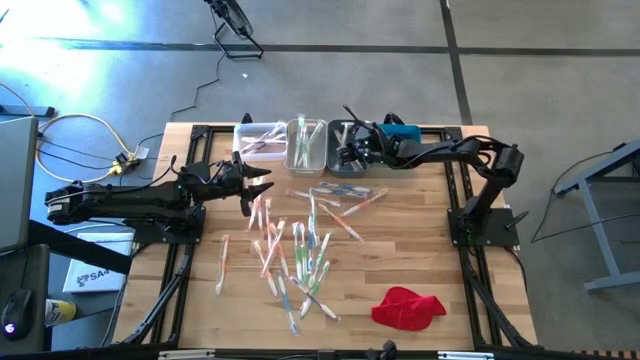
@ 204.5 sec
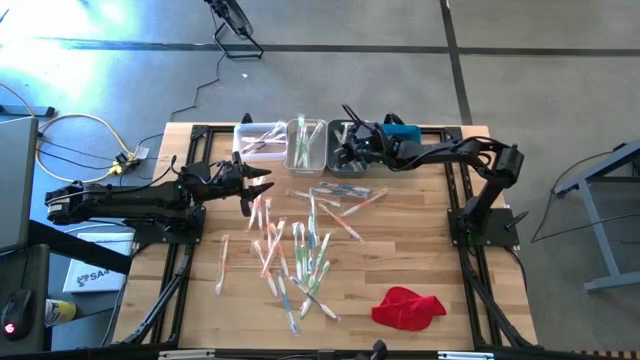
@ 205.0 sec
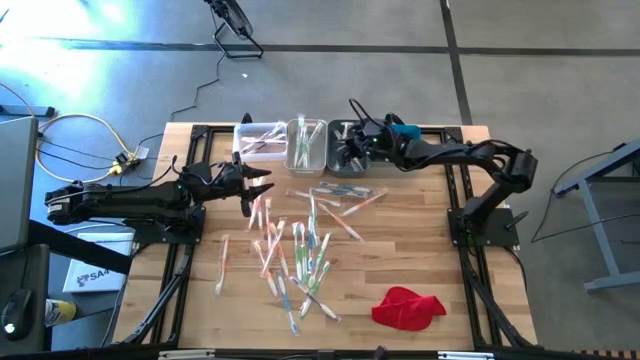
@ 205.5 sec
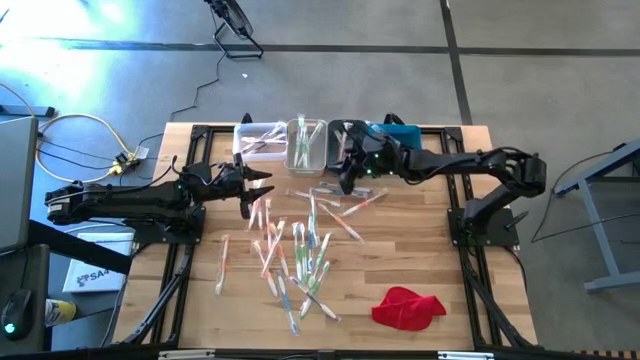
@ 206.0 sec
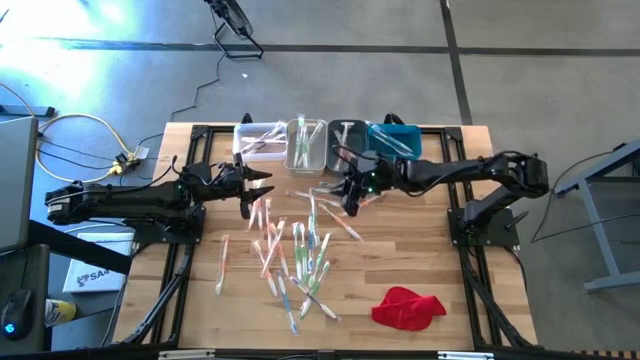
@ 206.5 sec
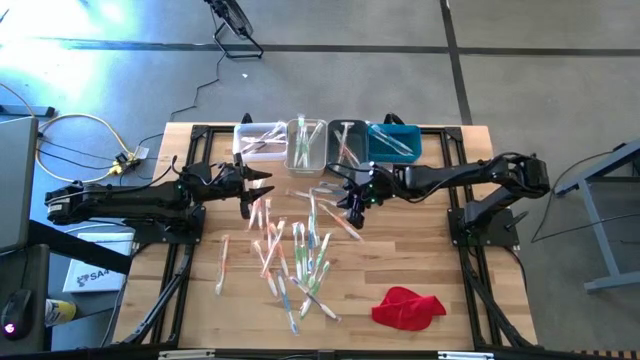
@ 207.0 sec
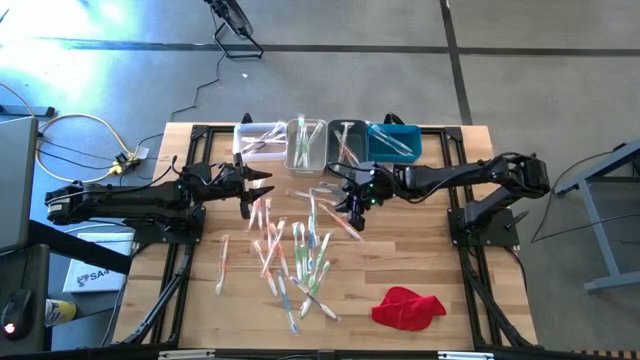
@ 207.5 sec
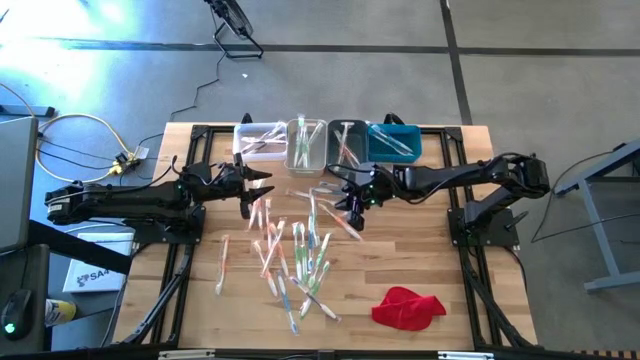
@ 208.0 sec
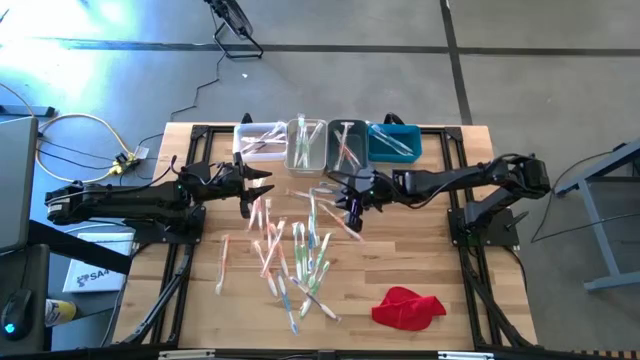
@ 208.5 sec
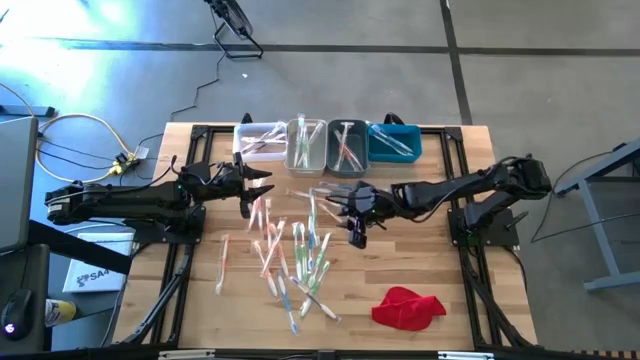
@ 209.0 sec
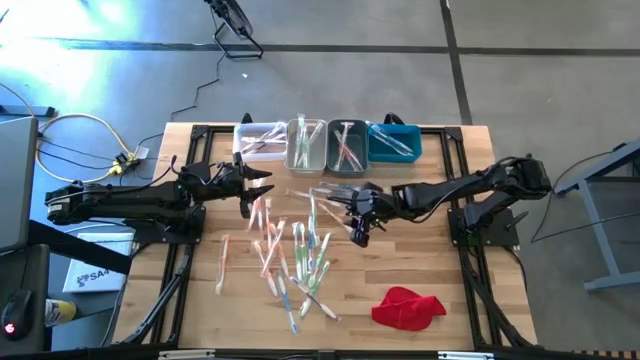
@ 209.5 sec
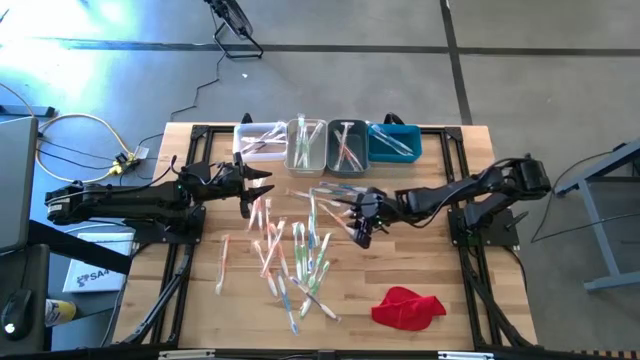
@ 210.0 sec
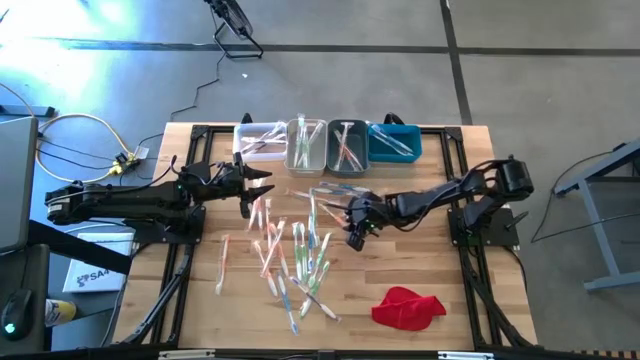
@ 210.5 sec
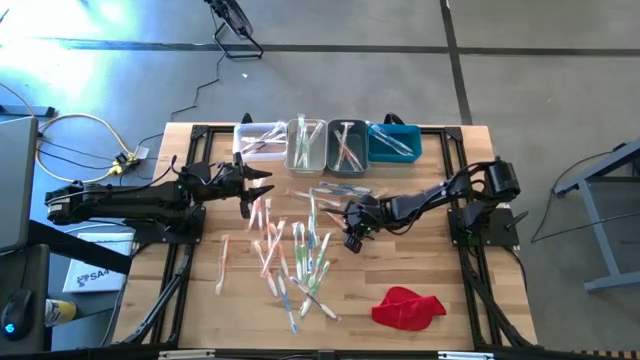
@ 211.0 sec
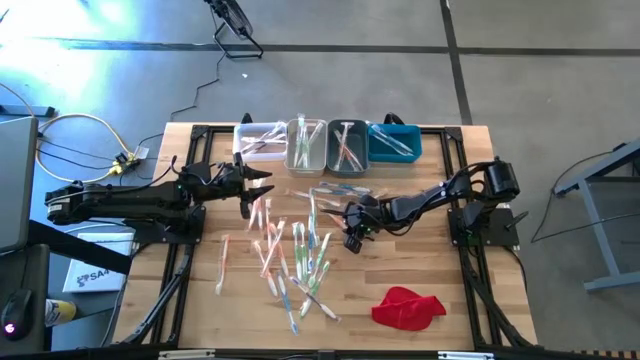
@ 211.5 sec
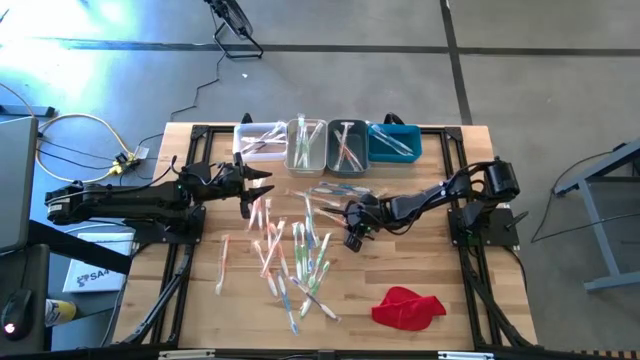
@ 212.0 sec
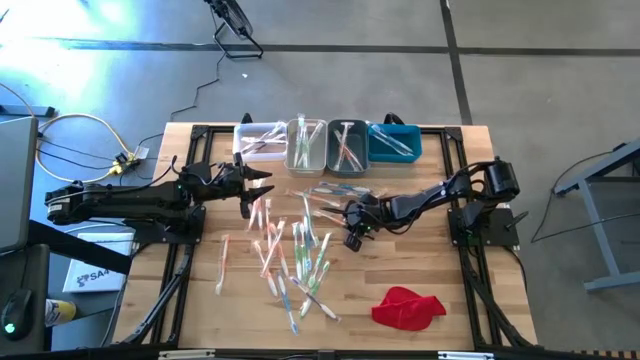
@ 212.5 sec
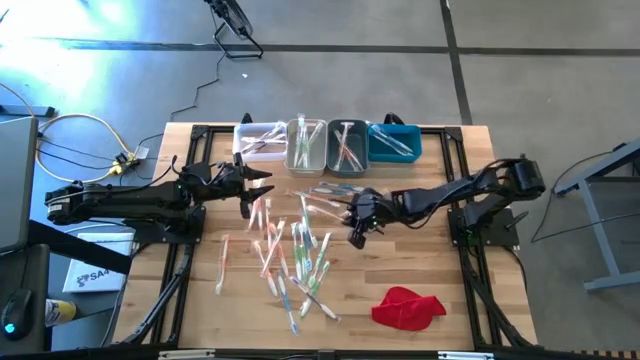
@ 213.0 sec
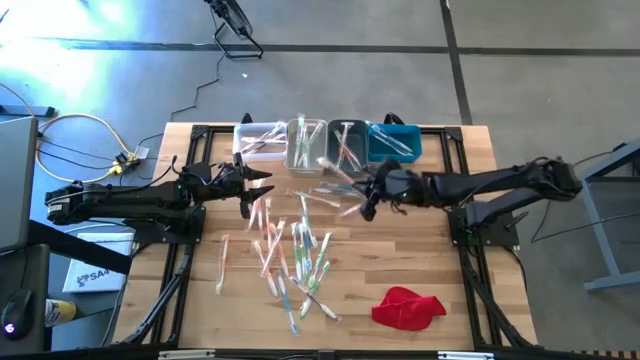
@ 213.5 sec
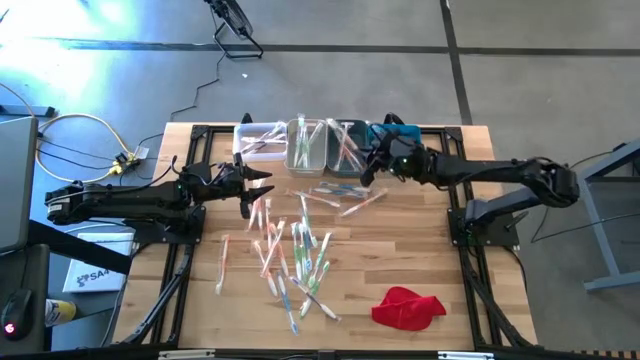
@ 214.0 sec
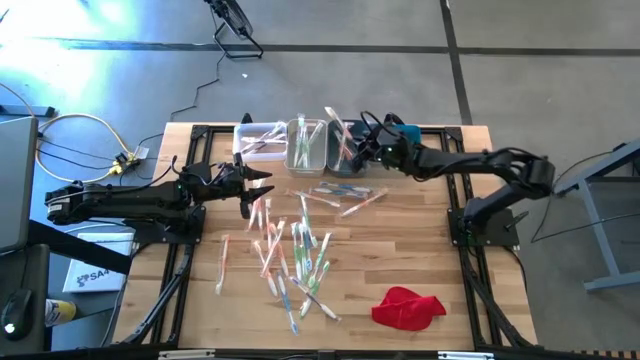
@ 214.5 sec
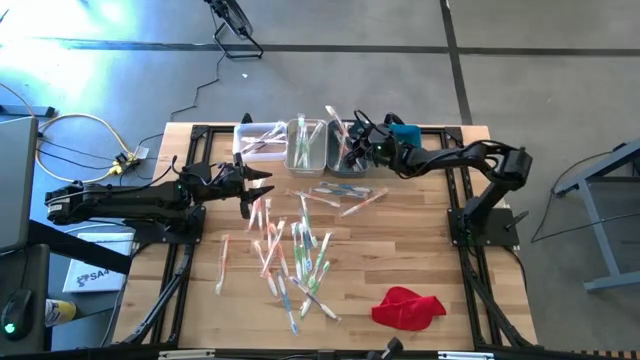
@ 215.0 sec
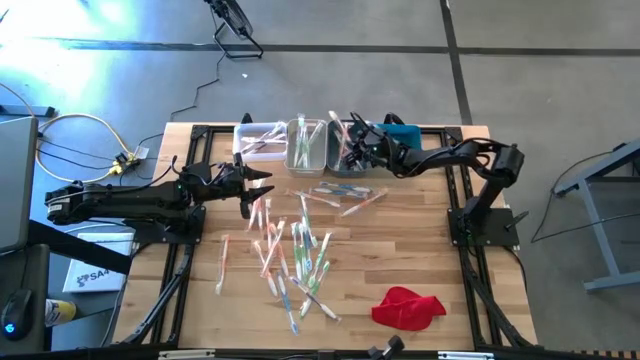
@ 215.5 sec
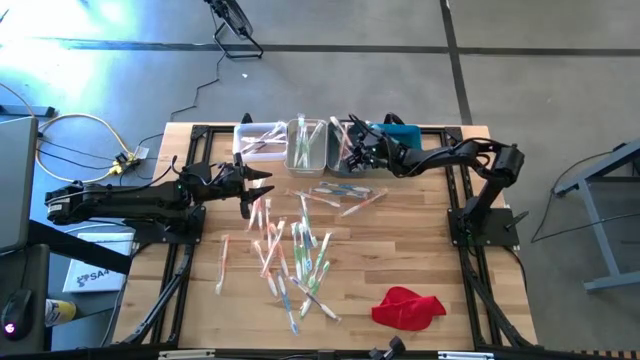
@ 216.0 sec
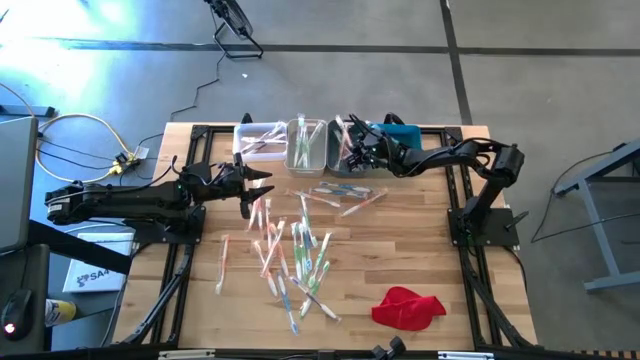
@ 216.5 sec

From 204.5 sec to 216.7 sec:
Task: Pick & Place Toothbrushes
Put the orange toothbrush into the dark green bin

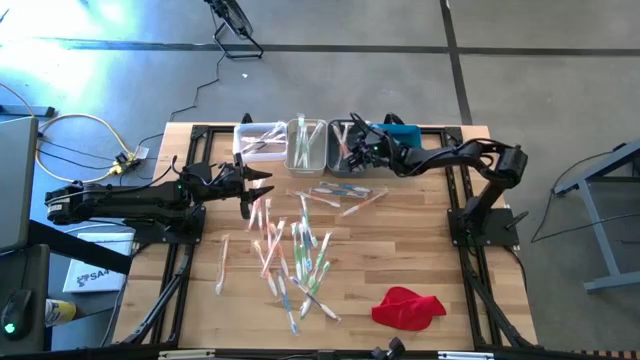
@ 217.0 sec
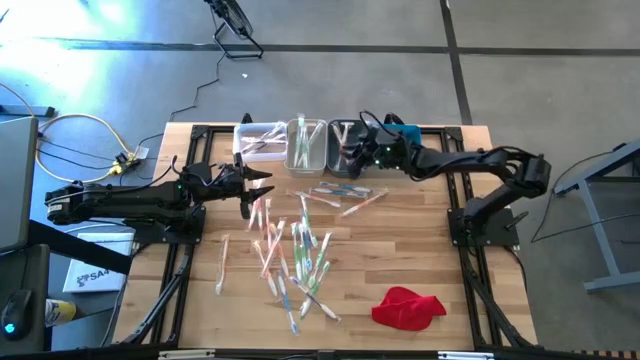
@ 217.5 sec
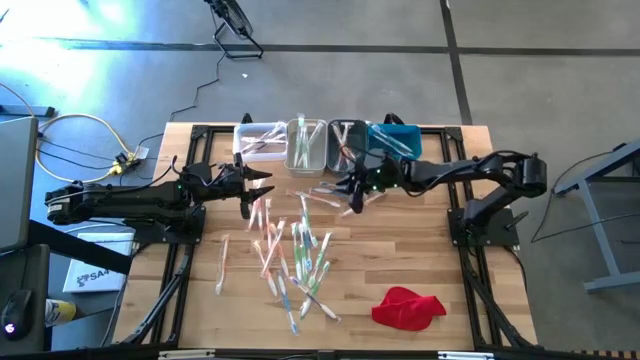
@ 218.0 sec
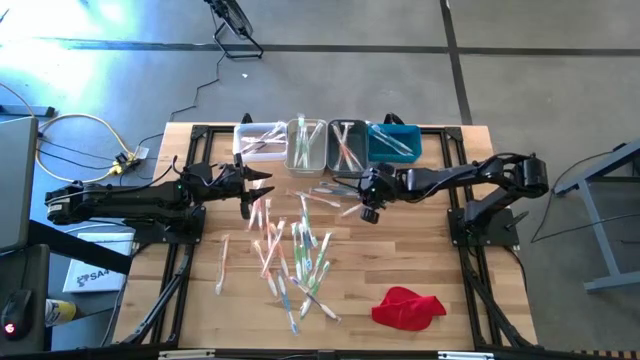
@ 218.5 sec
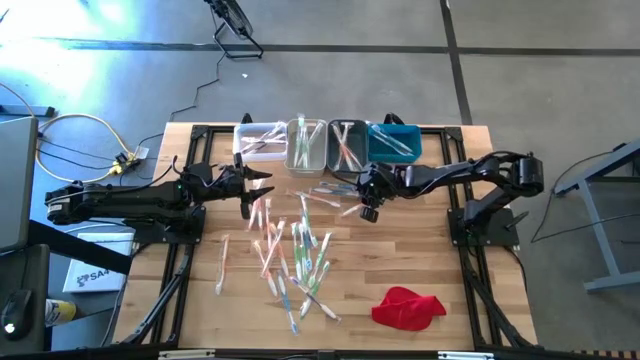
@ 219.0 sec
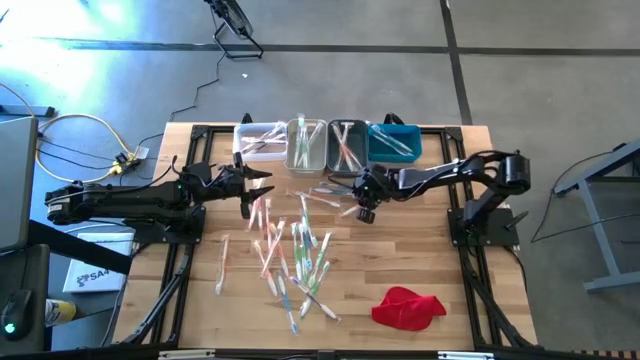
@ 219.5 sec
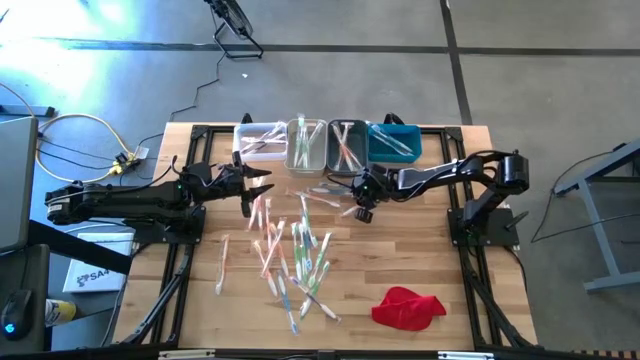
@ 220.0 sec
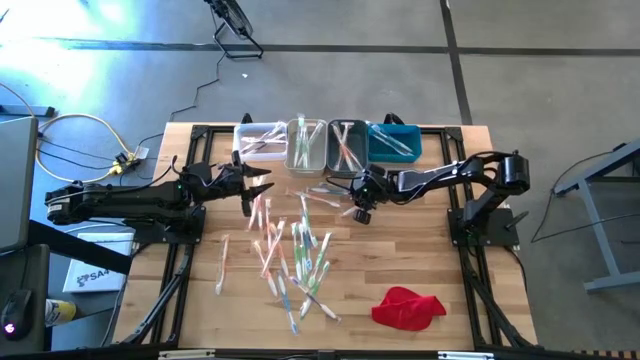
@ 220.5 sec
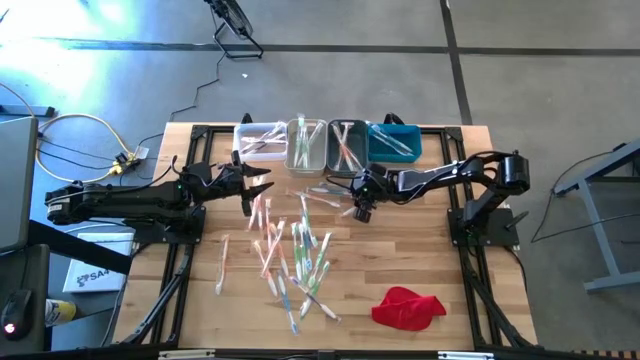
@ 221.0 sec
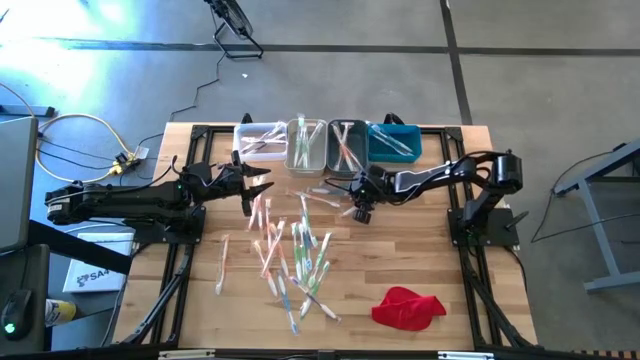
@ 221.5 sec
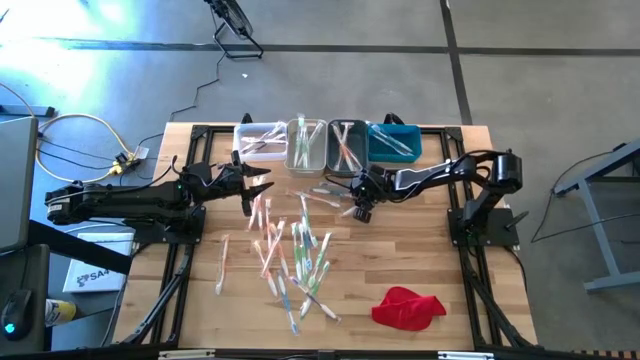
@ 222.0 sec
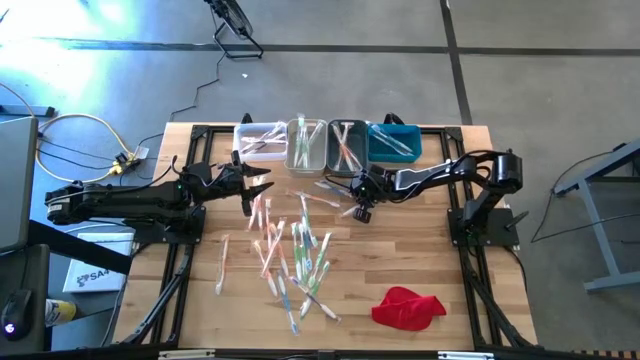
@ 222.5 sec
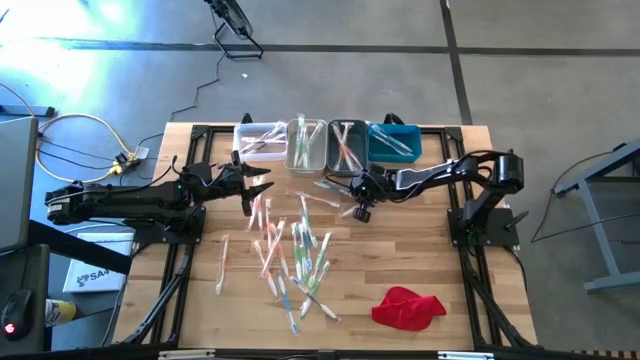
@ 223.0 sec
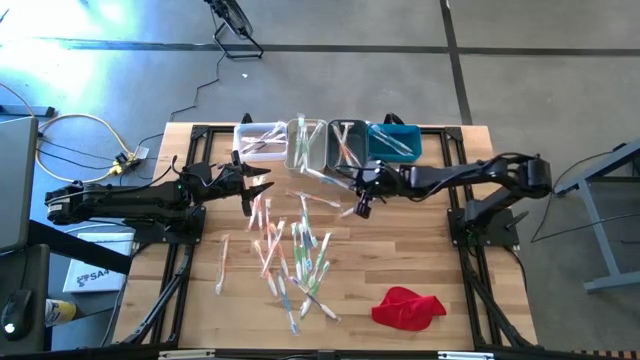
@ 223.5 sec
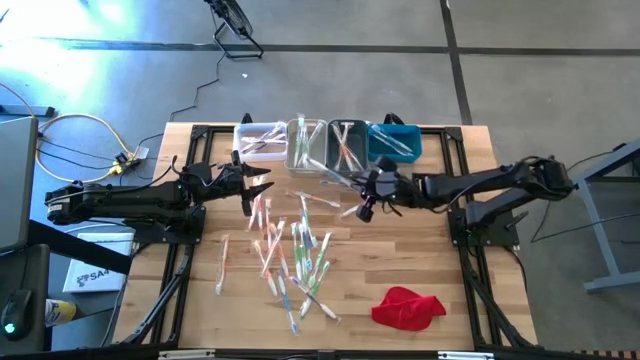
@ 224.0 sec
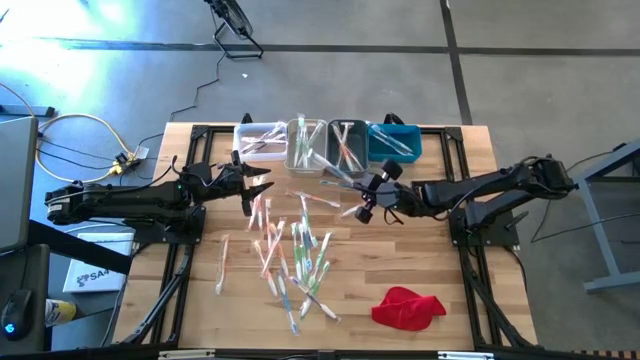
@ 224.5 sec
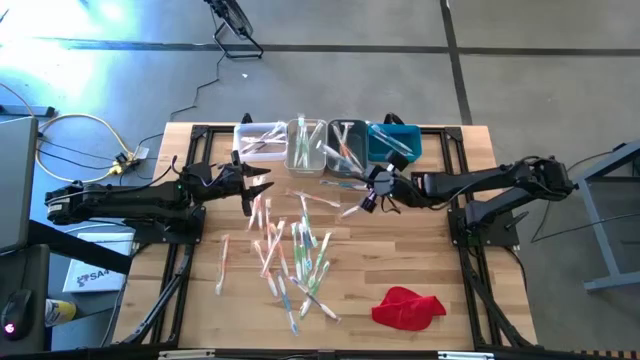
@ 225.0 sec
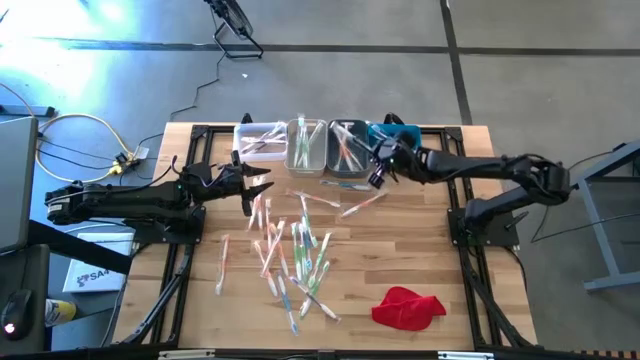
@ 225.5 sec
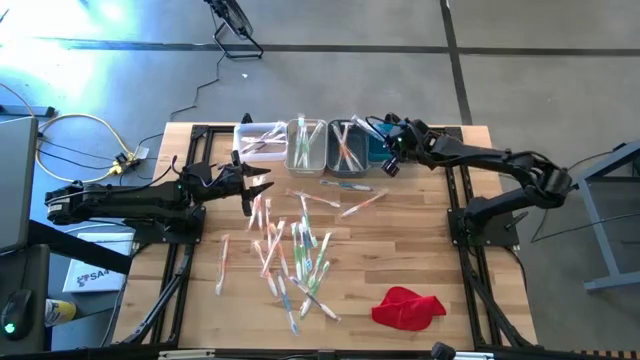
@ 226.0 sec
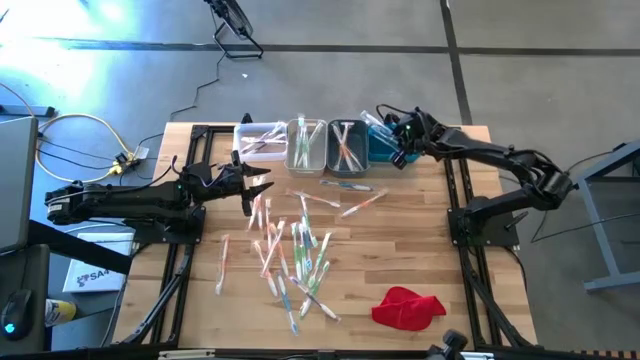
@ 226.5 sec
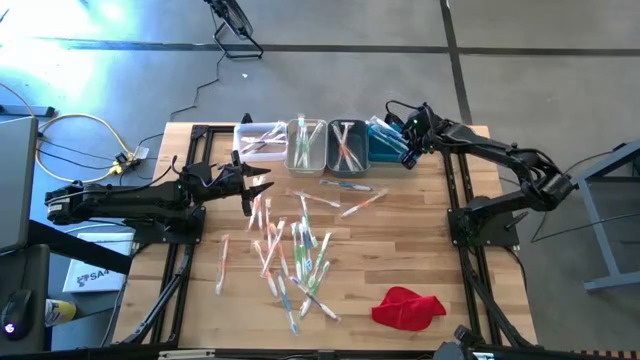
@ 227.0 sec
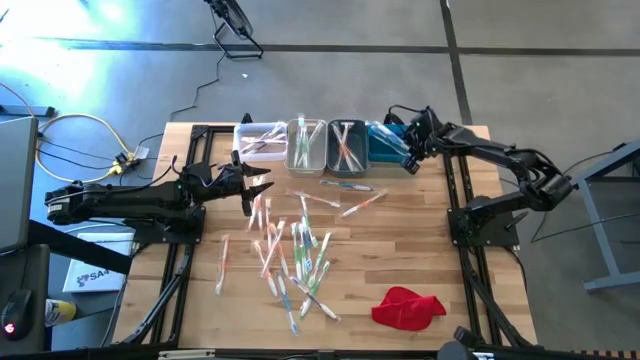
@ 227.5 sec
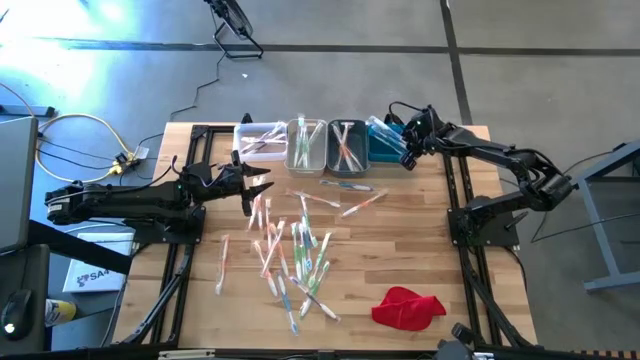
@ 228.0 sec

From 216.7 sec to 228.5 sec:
Put the blue toothbrush into the blue bin
